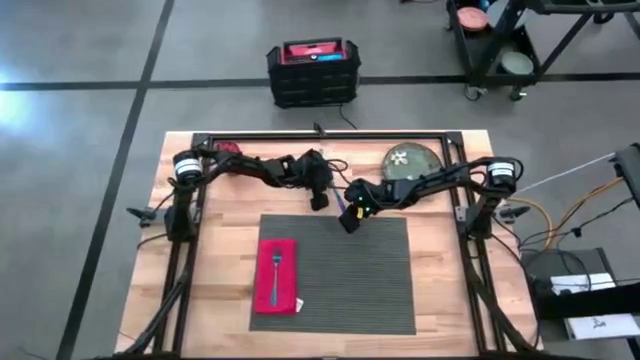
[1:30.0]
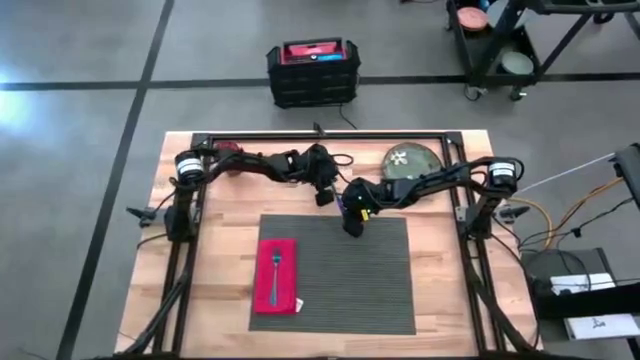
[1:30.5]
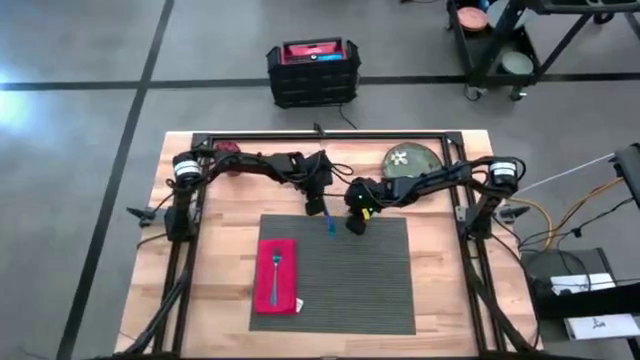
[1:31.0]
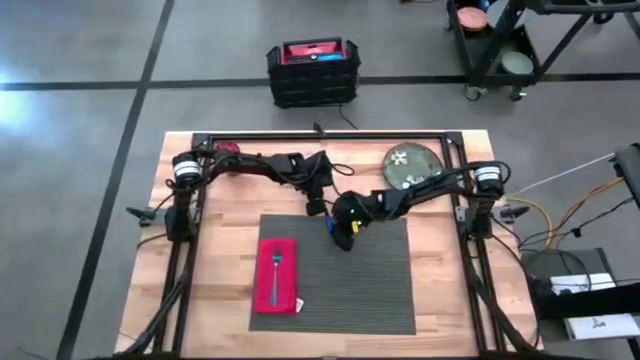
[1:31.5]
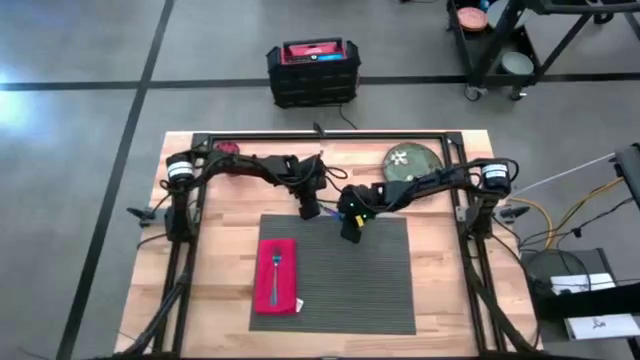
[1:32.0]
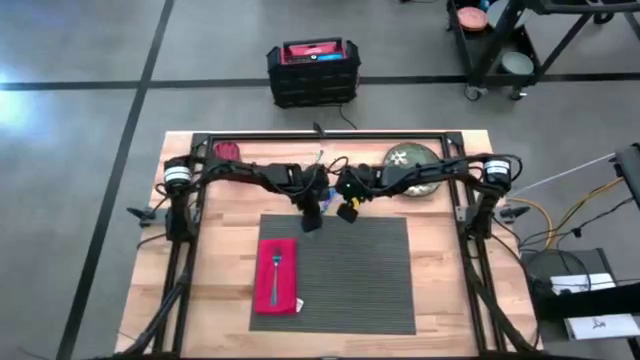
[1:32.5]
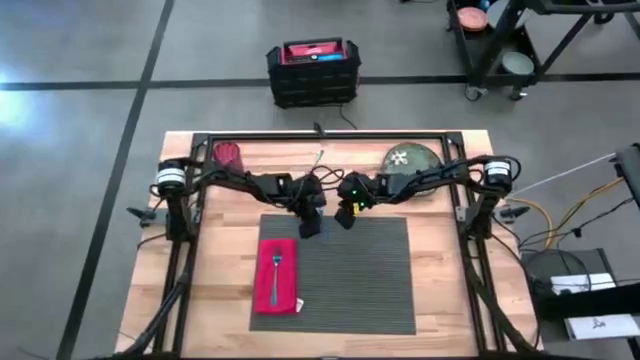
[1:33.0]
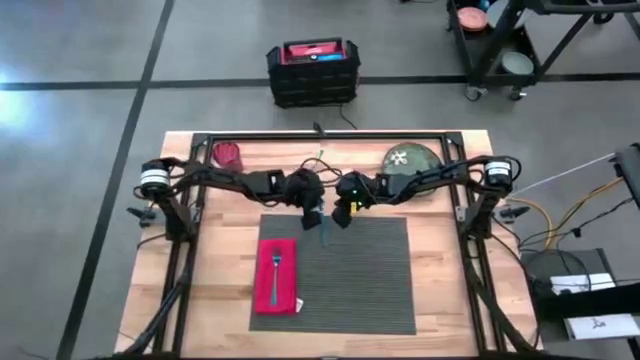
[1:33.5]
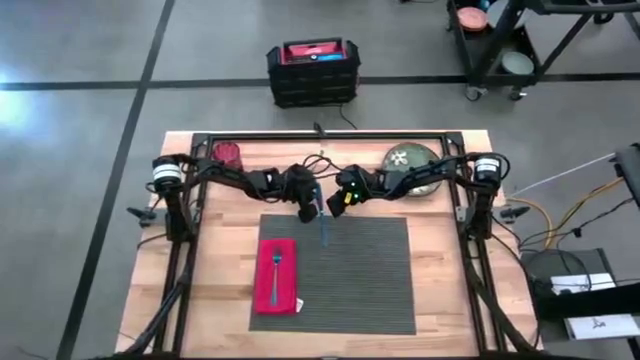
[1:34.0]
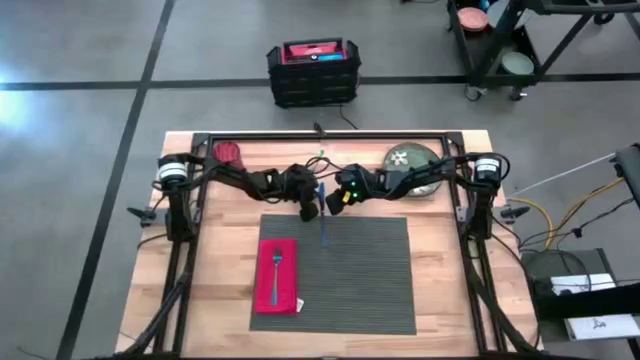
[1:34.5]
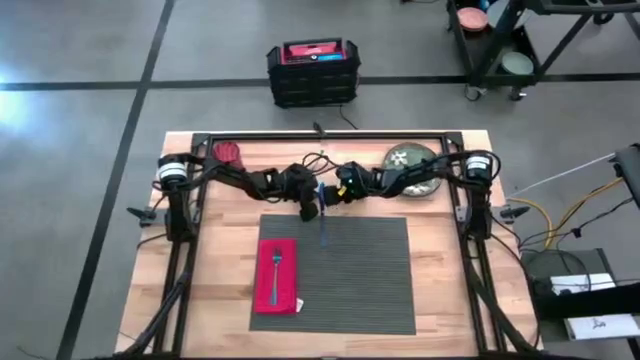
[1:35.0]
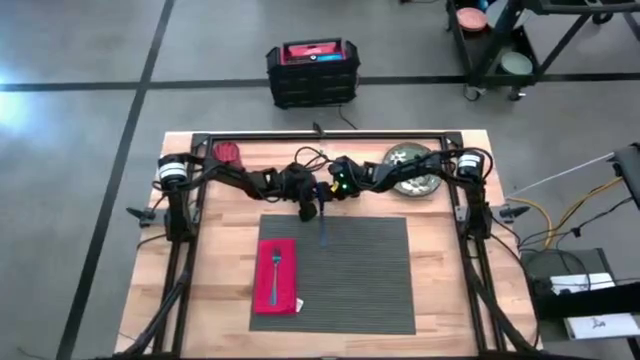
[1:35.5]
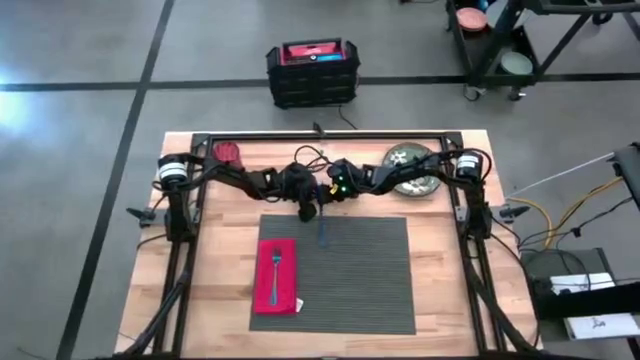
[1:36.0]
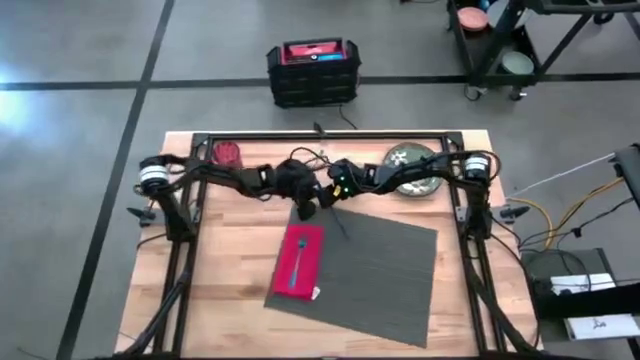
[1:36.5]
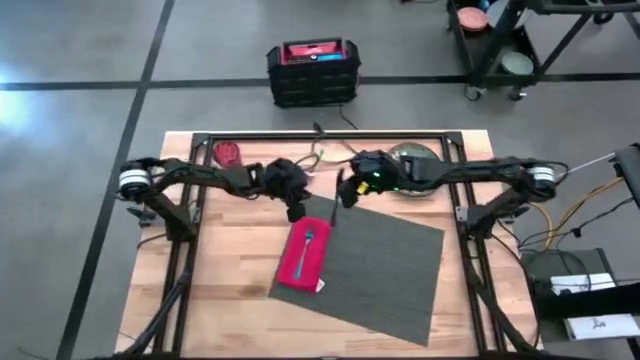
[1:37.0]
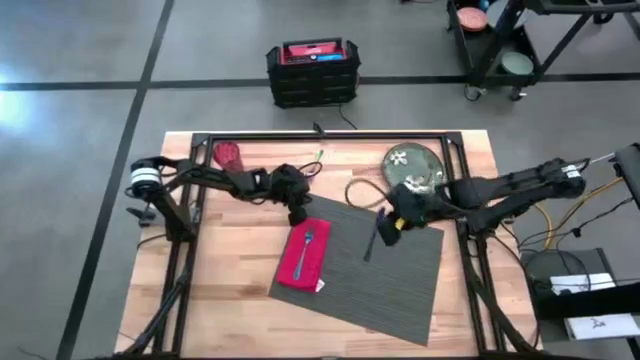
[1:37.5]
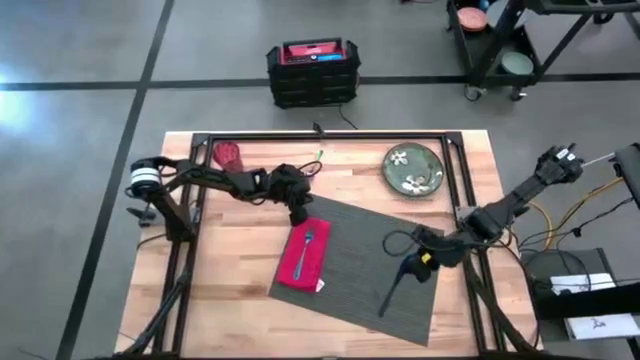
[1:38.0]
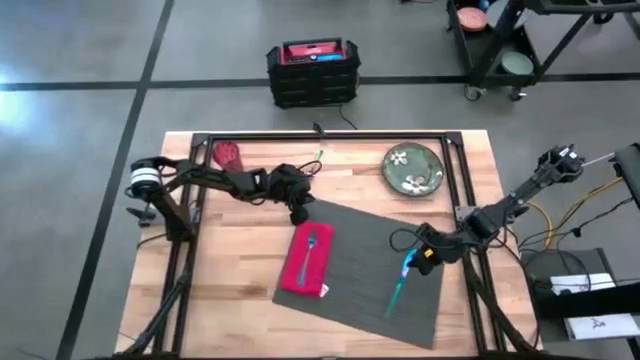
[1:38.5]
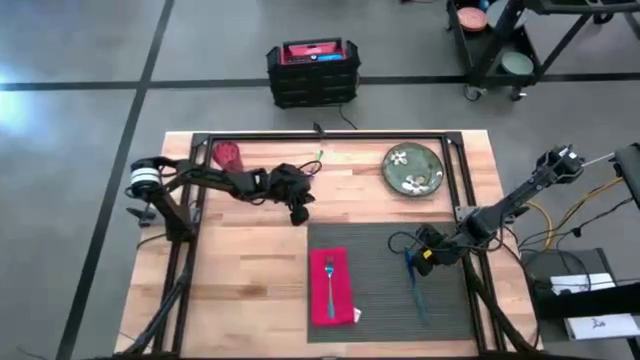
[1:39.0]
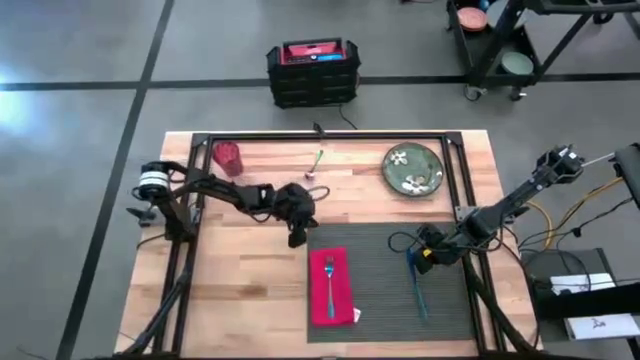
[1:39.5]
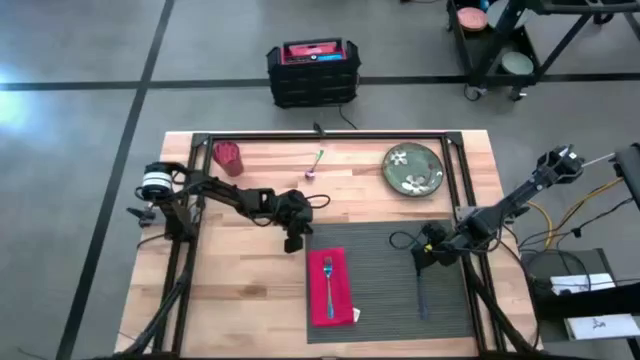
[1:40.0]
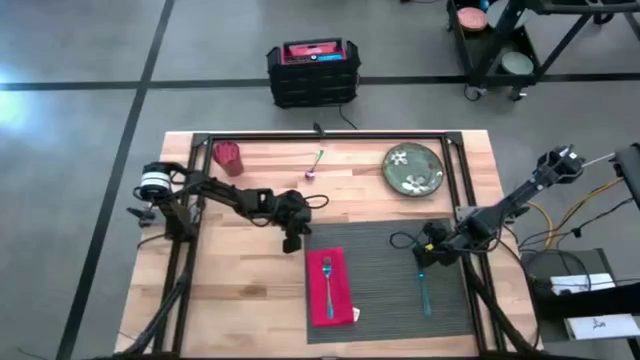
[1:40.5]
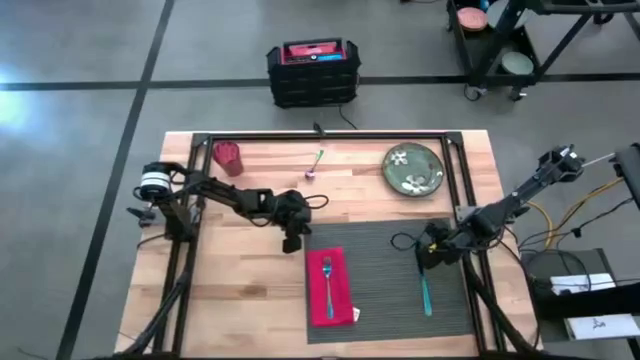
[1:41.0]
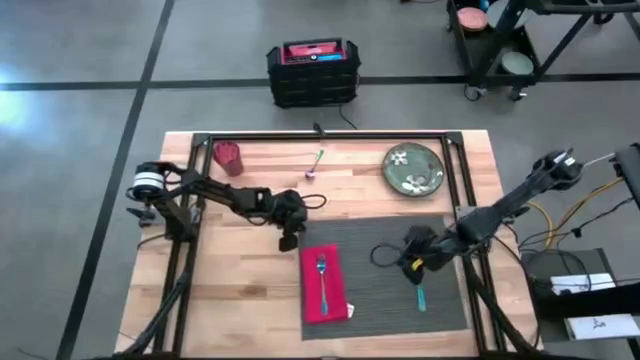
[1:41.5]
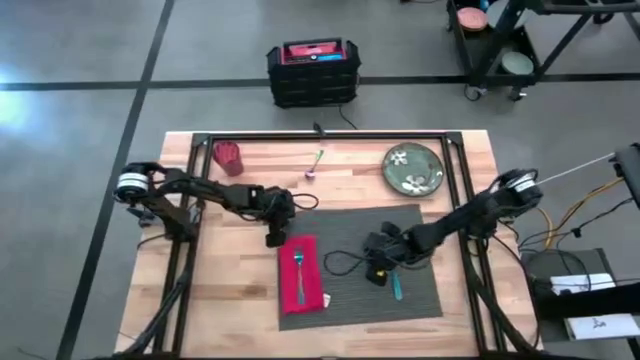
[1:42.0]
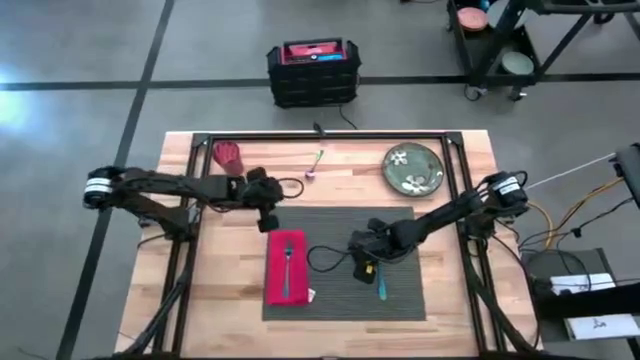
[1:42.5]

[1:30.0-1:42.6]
Task: Set table place
Put the blue knife on the right side of the table mat

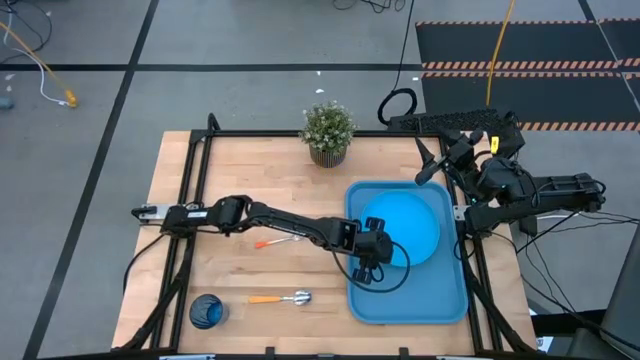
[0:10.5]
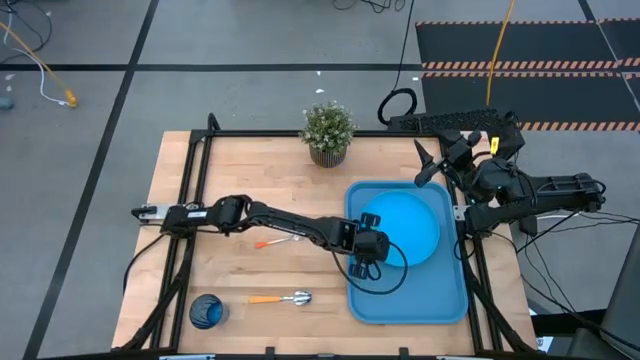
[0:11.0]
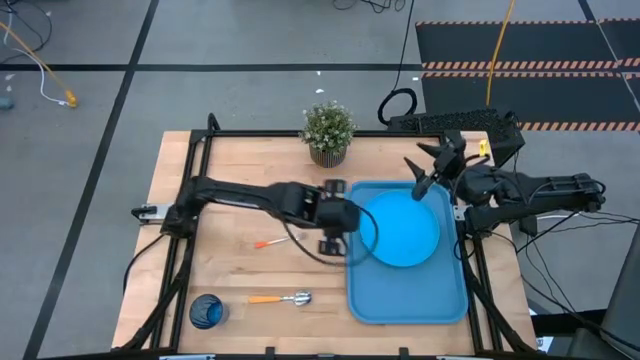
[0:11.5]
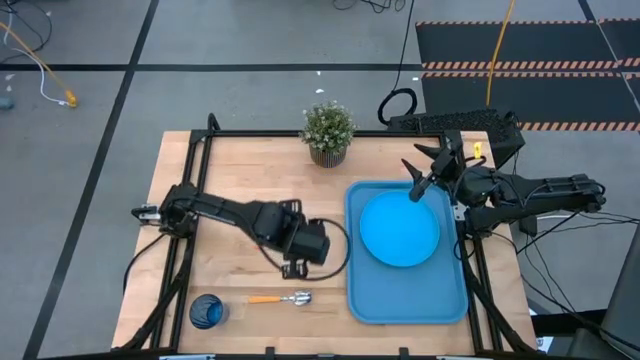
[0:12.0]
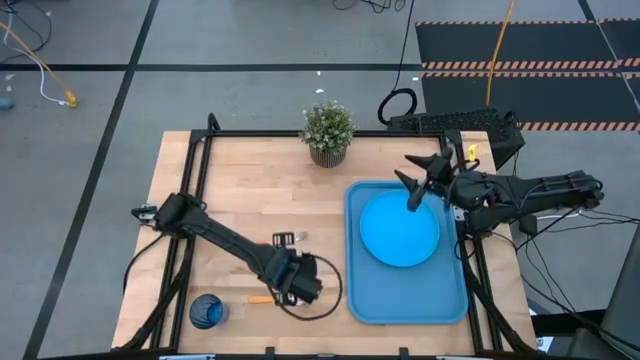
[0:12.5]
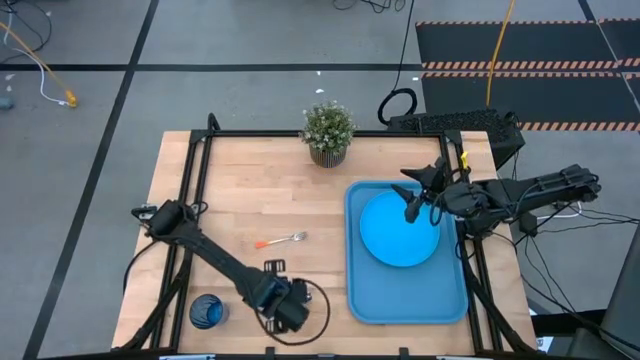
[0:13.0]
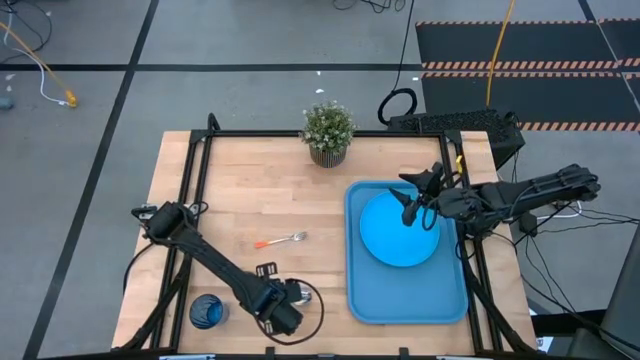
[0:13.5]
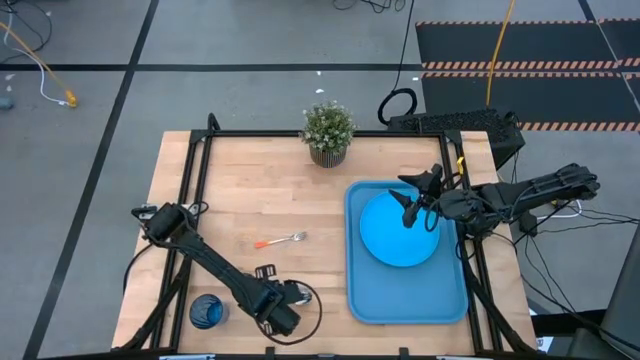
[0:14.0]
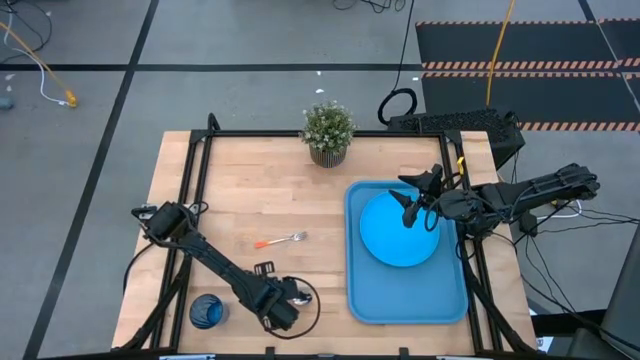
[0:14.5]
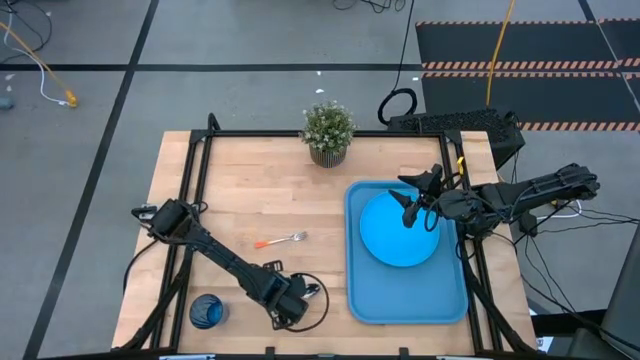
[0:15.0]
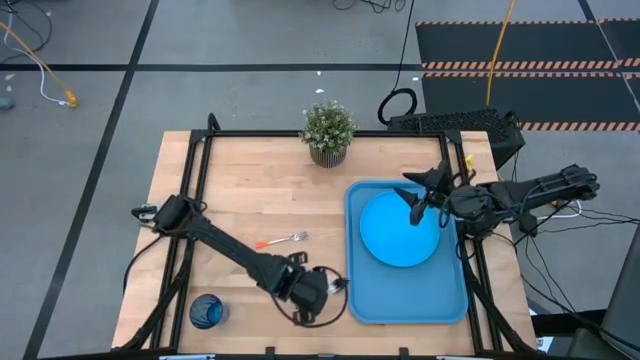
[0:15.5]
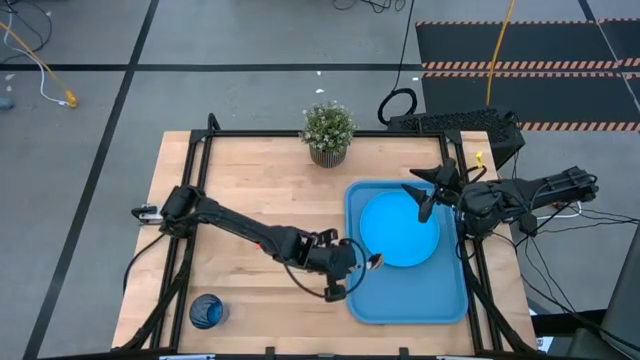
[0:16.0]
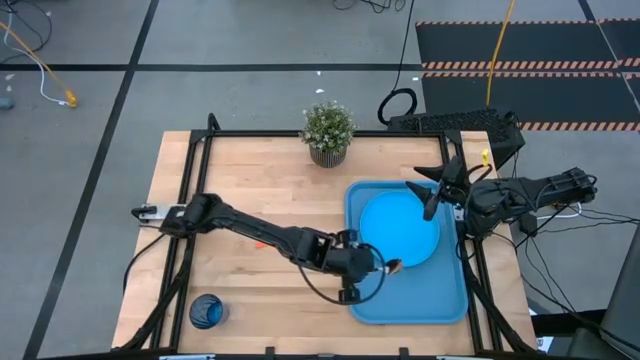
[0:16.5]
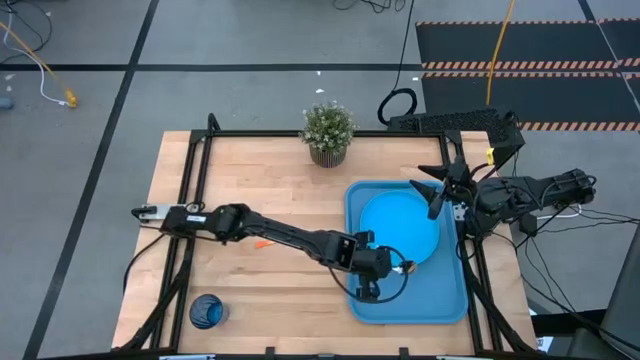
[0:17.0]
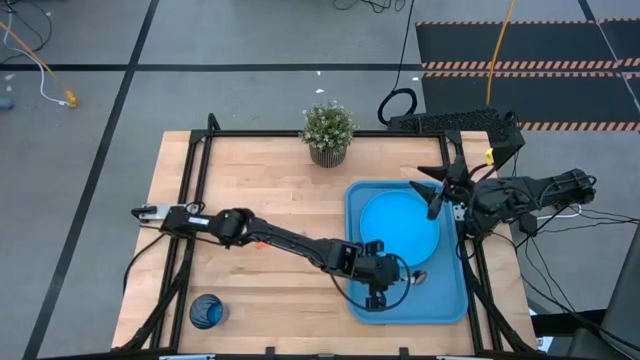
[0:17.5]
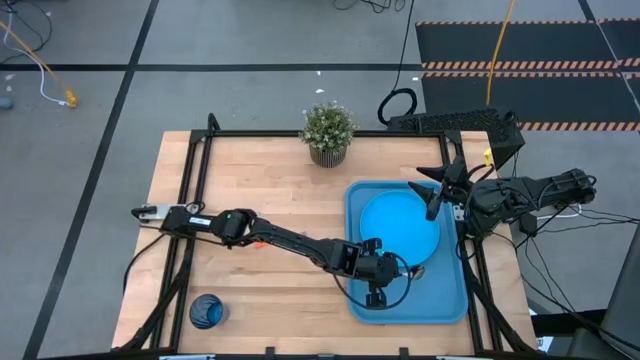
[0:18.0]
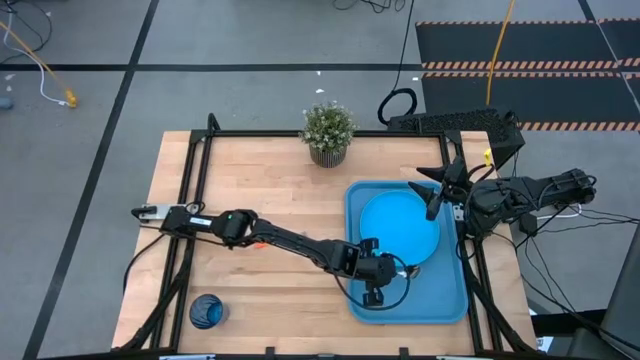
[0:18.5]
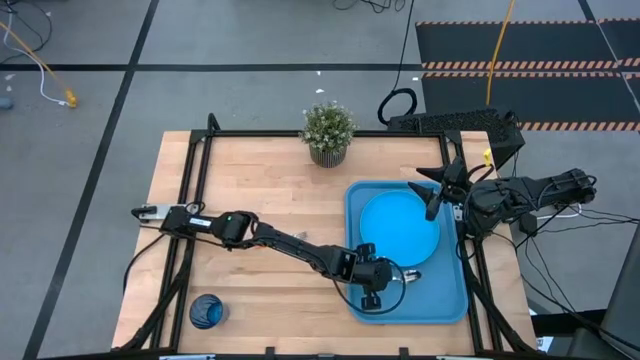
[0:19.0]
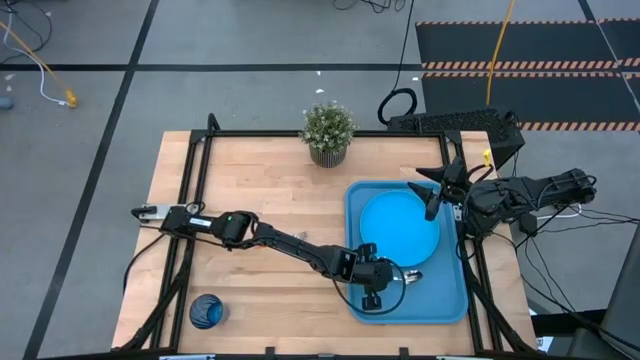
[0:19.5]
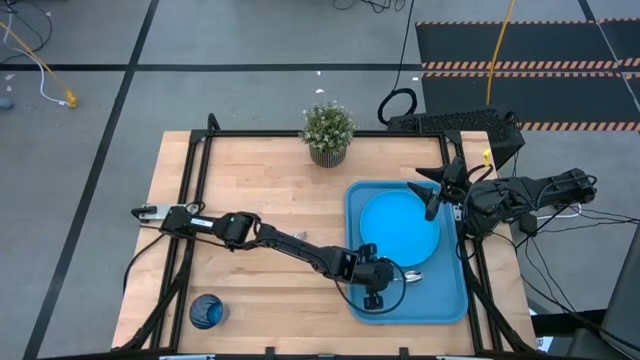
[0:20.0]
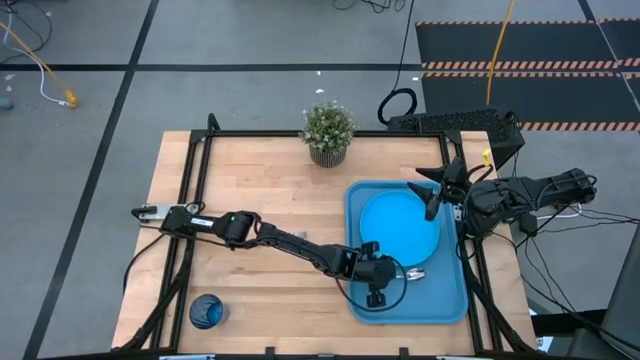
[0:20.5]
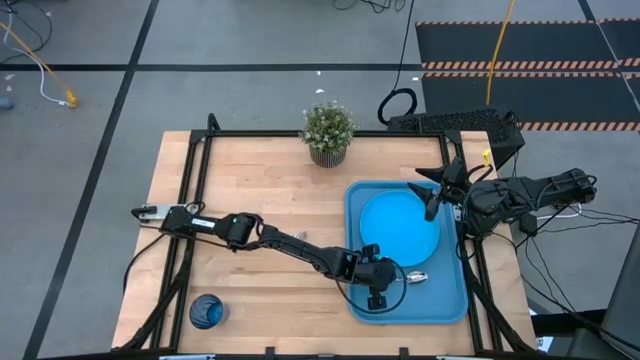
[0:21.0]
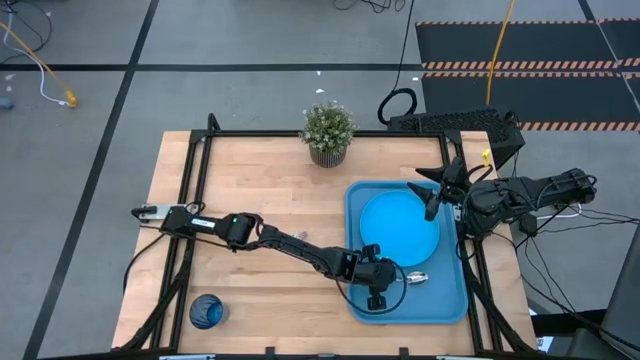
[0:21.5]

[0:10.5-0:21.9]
Task: Pick and place plate/cup/fork/spoon on tray
Put the orange spoon on the bottom of the blue plate on the blue tray
